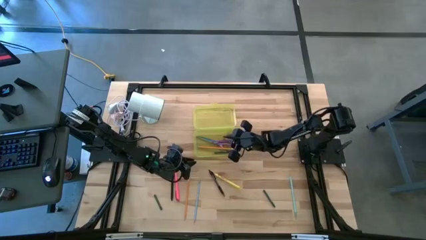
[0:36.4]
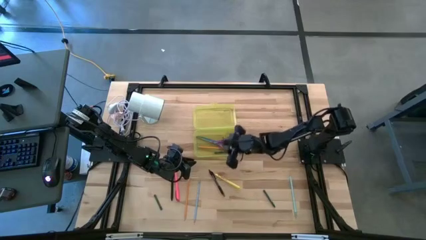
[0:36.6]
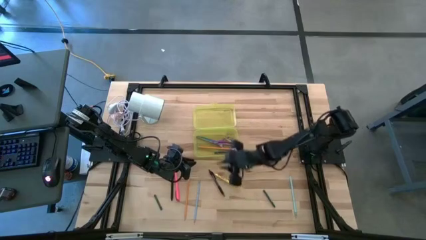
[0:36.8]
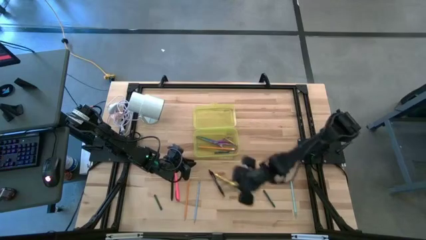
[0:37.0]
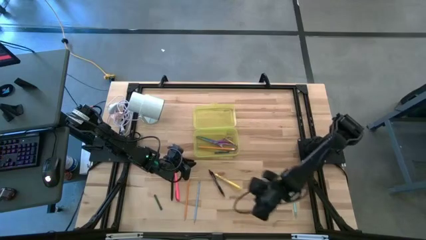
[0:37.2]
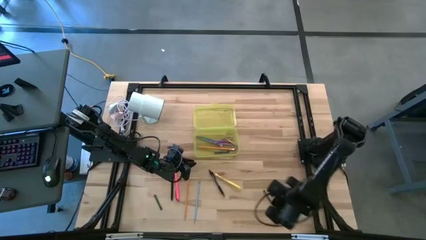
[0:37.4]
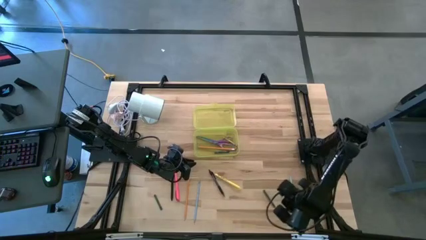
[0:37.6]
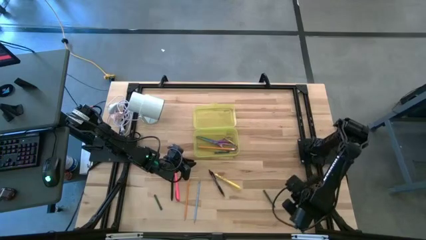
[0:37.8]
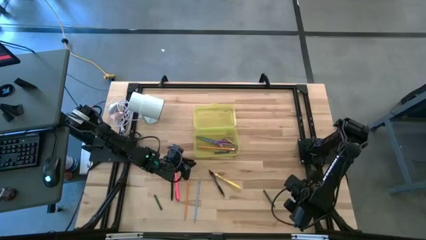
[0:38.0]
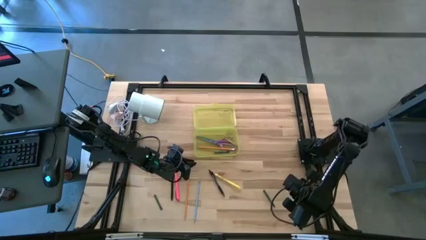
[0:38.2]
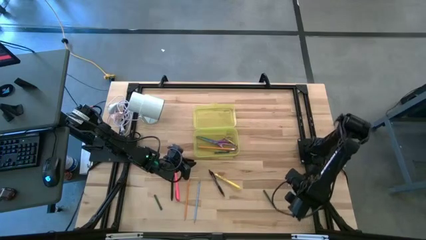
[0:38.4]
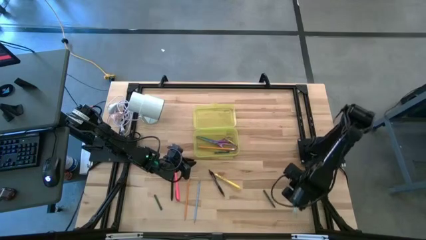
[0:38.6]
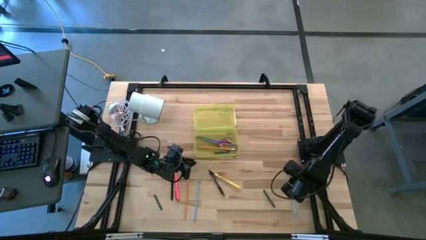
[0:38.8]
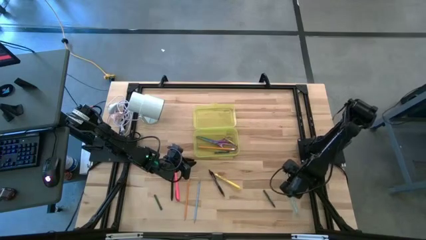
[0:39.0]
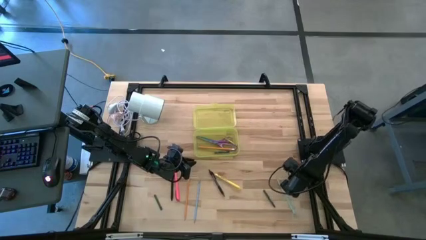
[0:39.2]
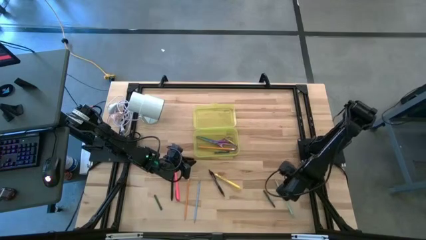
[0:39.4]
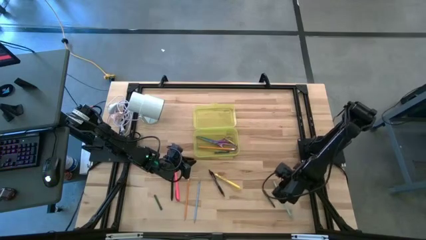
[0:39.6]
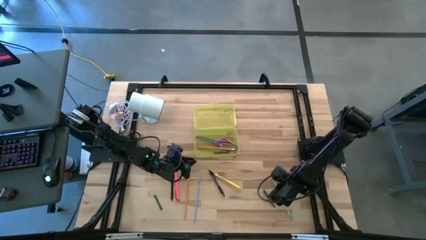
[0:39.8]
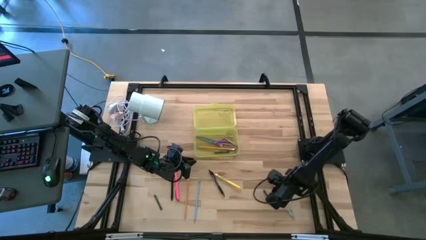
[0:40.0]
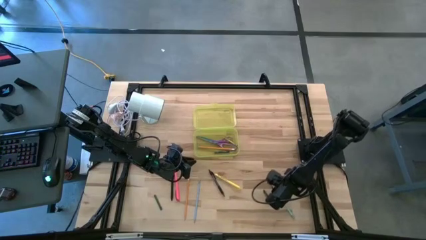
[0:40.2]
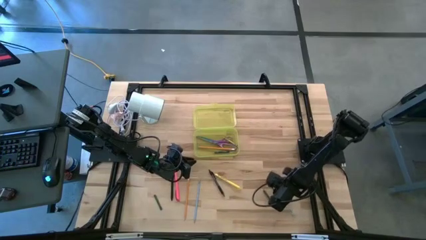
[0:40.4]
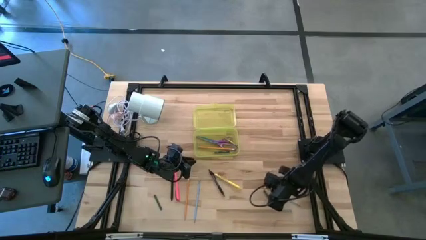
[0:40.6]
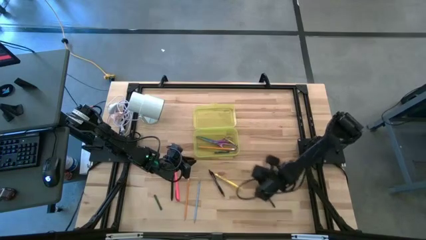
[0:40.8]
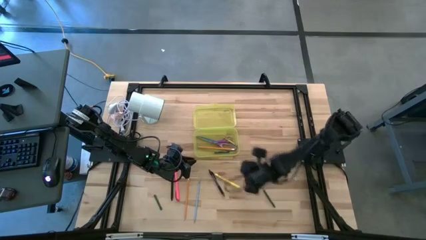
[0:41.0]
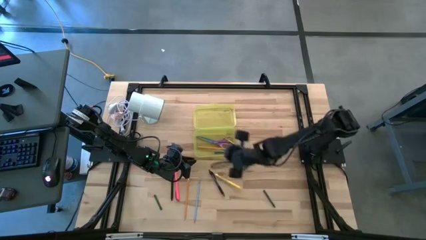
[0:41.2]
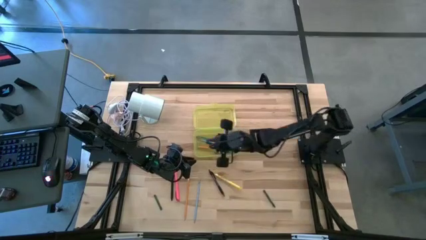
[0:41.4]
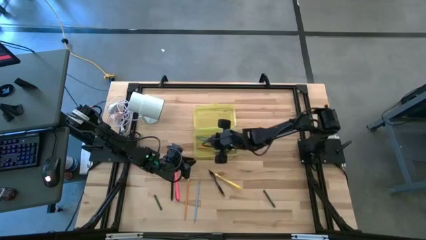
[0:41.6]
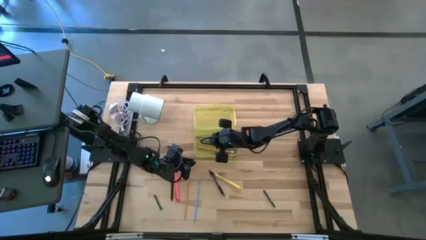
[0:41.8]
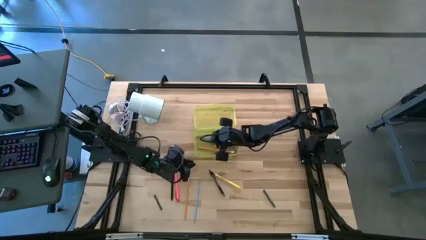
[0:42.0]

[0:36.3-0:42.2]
Task: Pick & place school supplies into a supply box
Put the light green pencil into the supply box

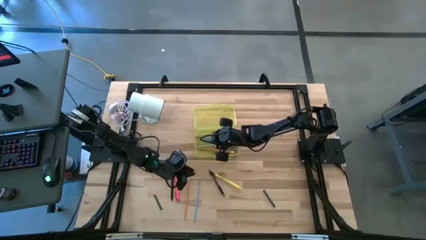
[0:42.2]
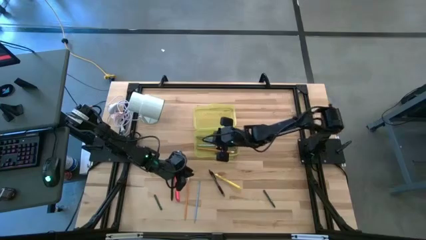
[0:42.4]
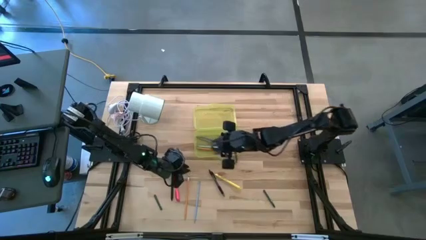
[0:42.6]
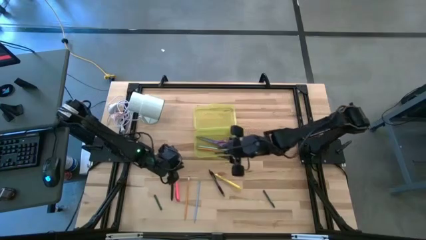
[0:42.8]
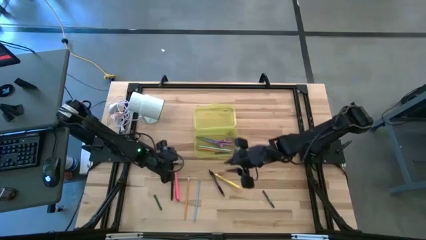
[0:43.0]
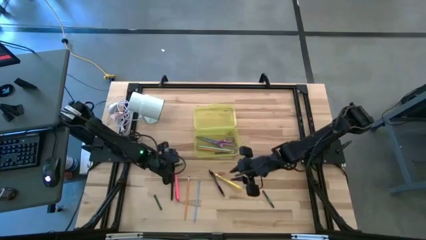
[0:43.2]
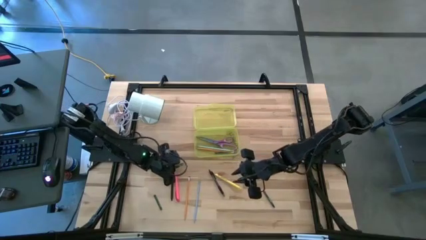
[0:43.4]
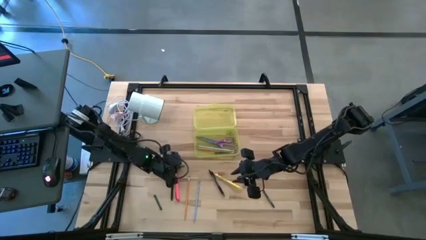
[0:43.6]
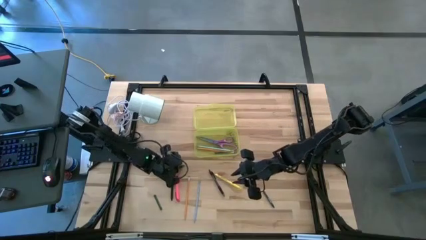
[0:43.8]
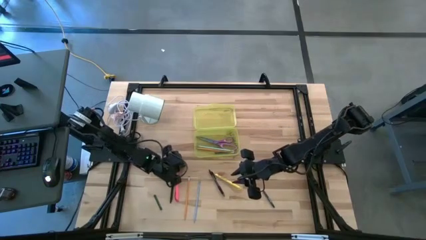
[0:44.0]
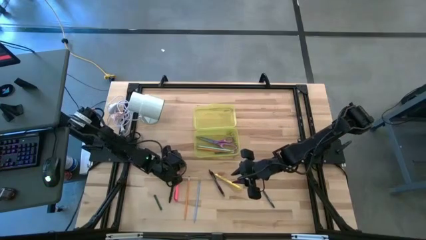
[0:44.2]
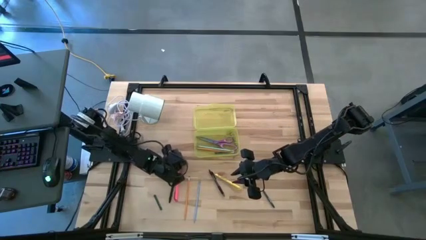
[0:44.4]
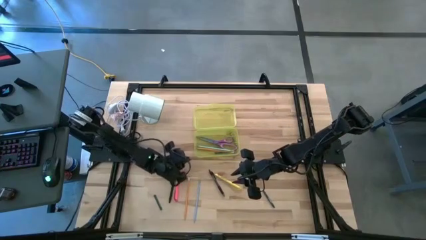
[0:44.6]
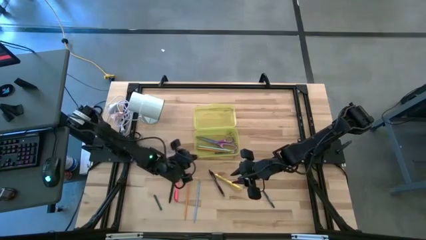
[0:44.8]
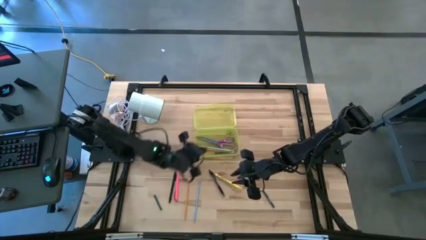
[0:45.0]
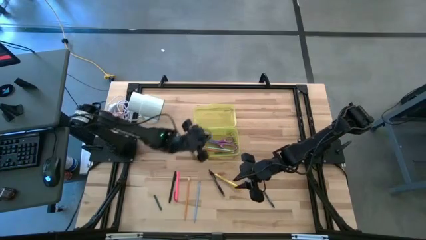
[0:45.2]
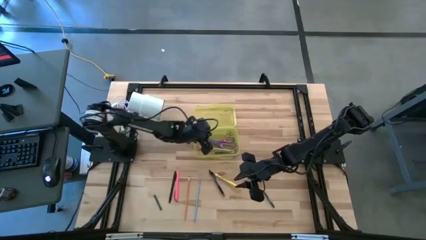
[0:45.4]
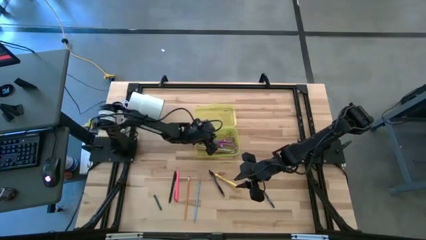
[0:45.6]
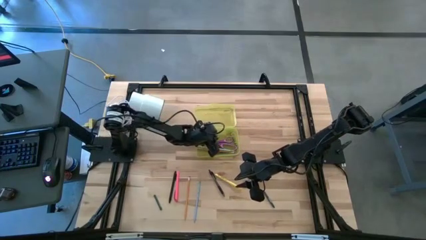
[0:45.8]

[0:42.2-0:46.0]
Put the green crayon into the supply box

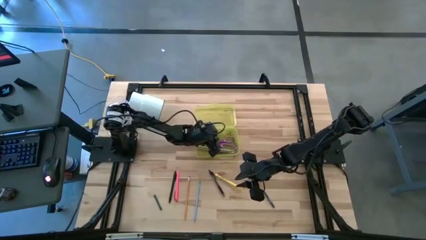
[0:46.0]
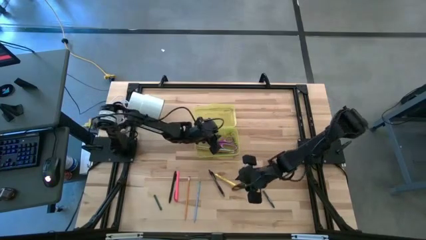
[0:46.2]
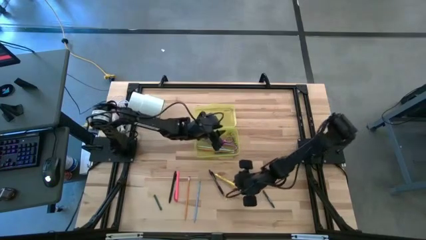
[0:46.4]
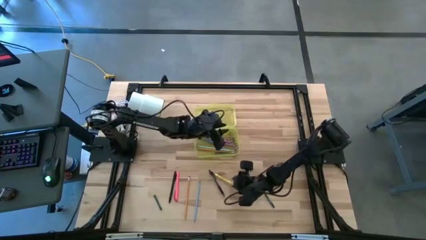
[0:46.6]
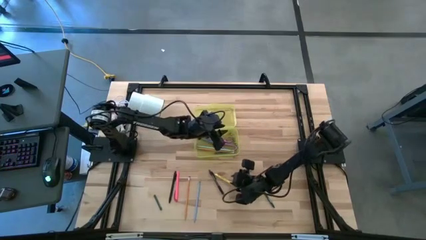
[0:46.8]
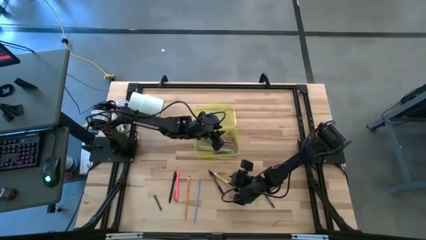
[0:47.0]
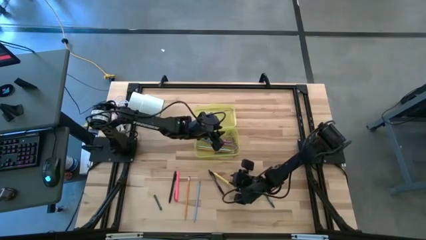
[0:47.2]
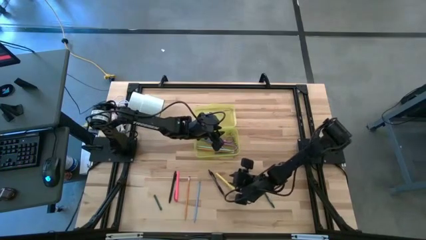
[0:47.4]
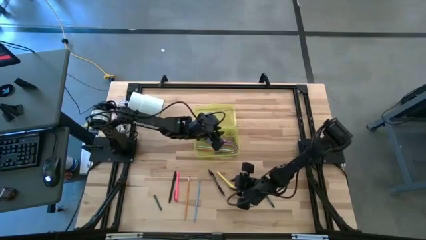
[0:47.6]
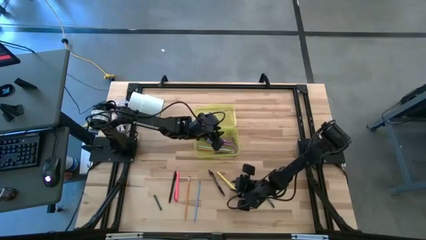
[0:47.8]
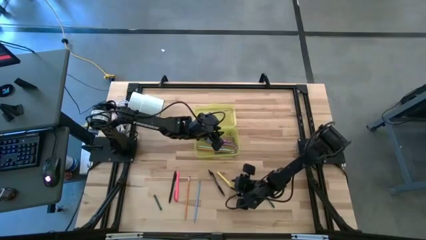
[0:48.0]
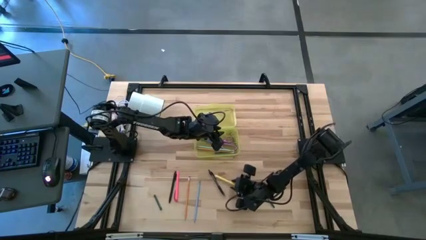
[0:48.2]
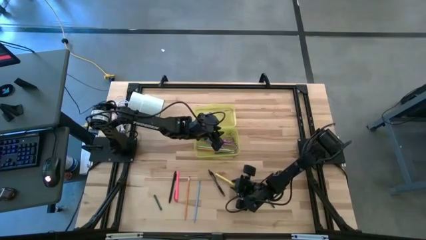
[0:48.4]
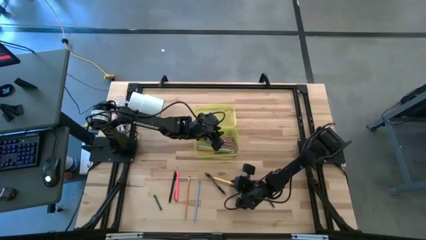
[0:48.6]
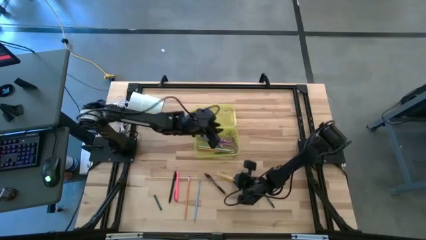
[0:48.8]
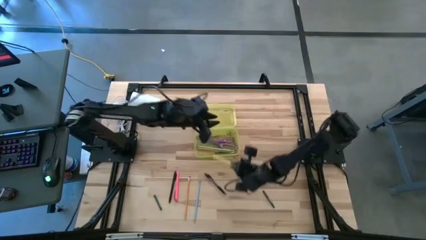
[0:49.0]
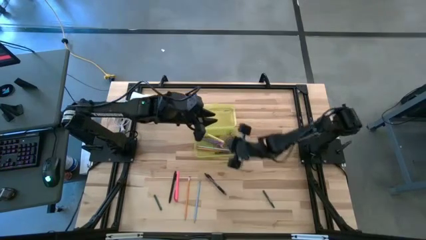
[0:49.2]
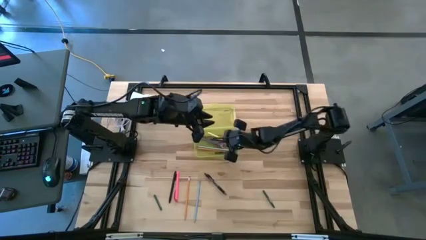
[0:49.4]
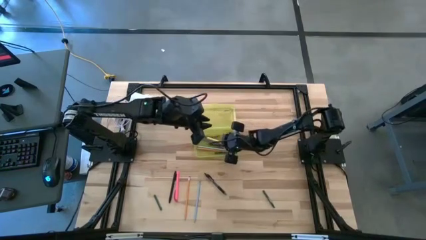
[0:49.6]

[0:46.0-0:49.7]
Put the yellow pen into the supply box

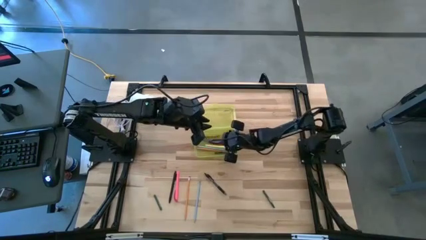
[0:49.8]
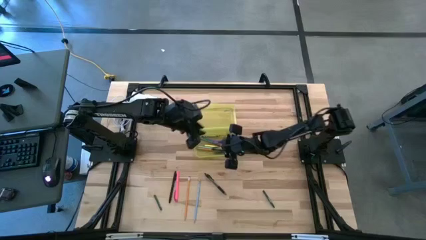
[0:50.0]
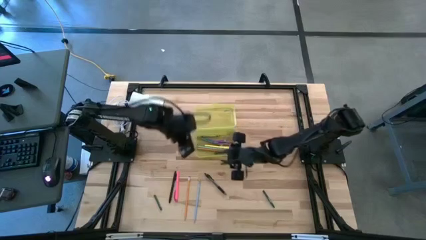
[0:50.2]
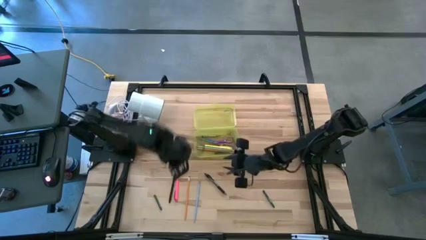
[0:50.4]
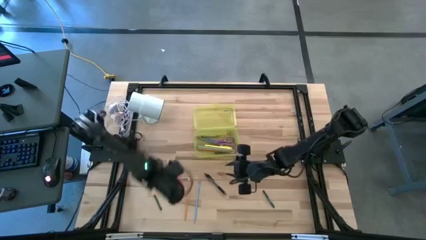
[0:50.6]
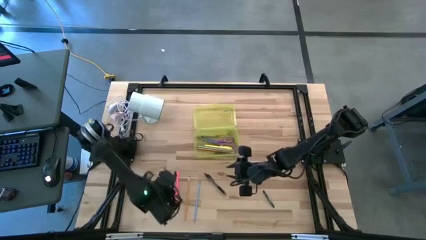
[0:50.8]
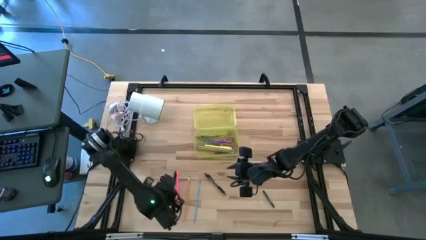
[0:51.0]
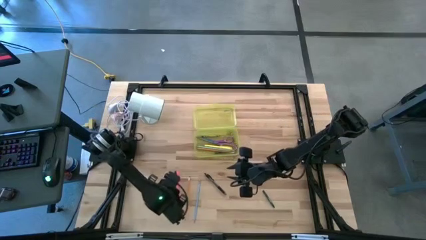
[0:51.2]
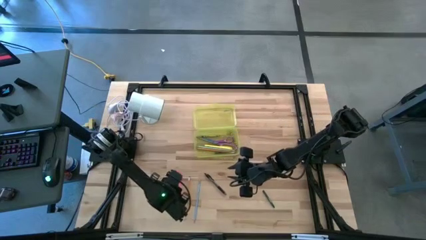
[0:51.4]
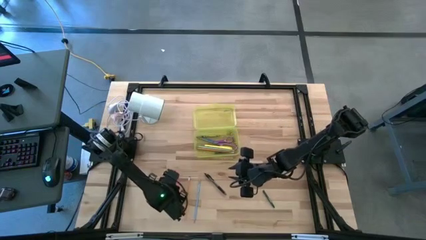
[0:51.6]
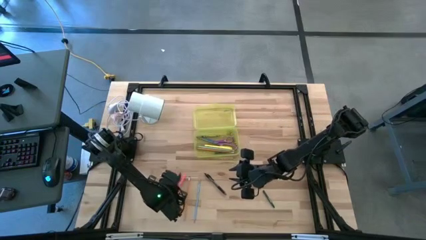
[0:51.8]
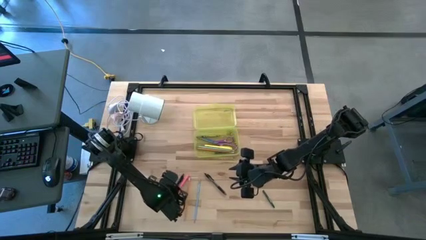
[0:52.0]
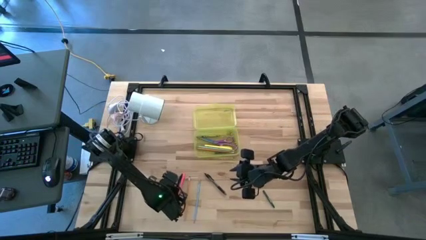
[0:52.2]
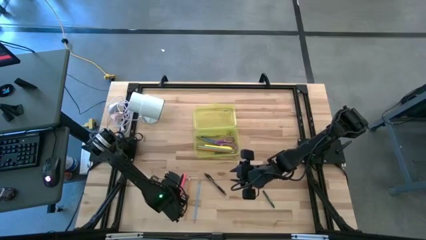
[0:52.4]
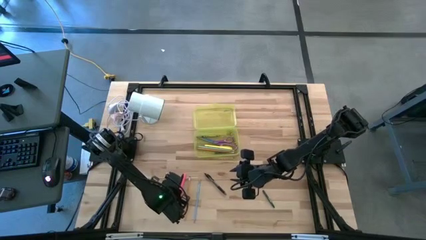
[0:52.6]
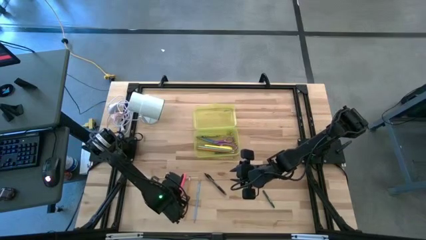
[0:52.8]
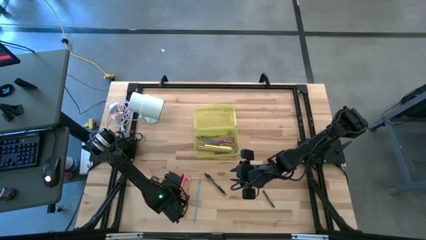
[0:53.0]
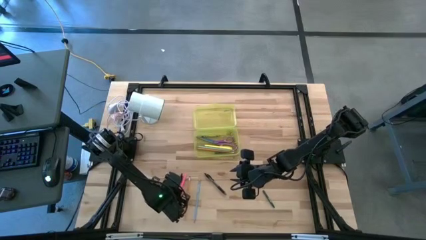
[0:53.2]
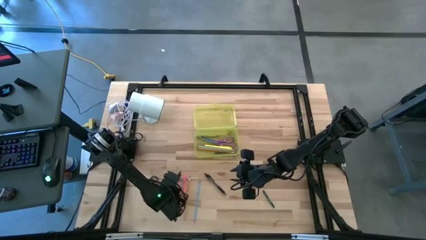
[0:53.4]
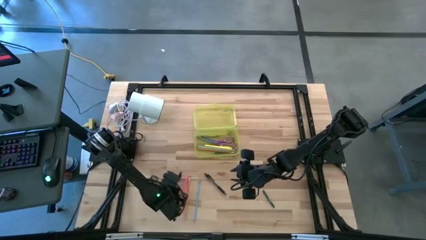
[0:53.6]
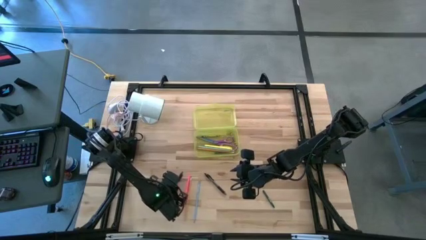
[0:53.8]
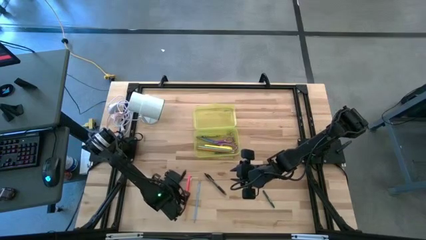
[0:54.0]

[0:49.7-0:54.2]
Put the black pen into the supply box
